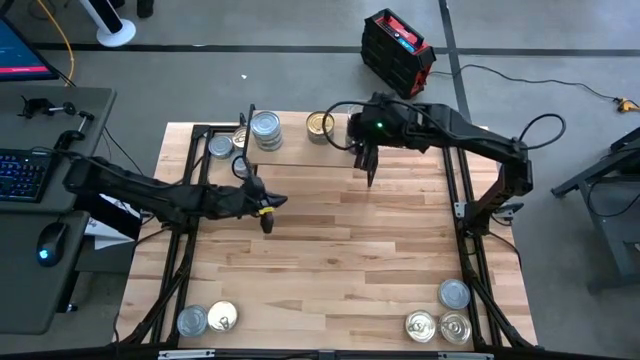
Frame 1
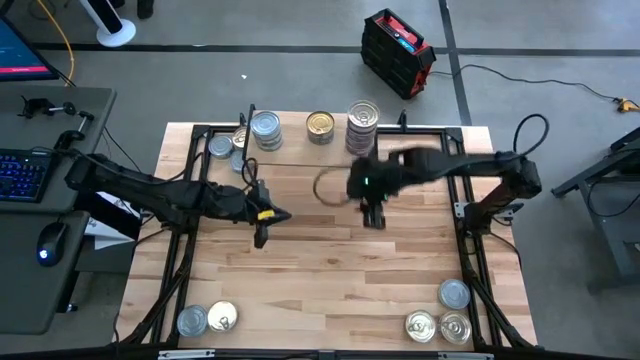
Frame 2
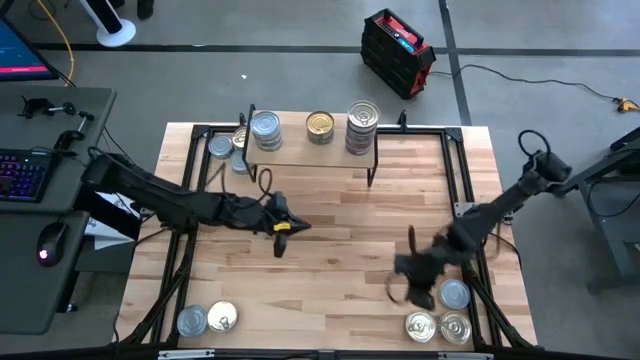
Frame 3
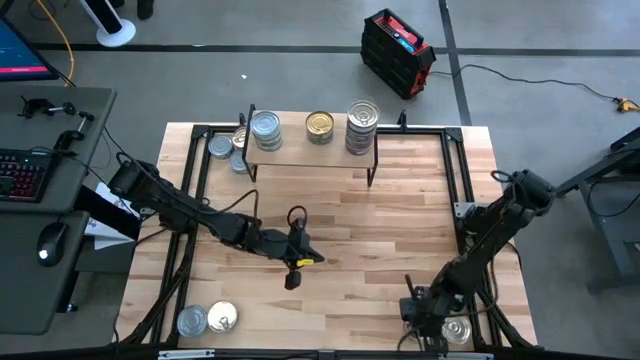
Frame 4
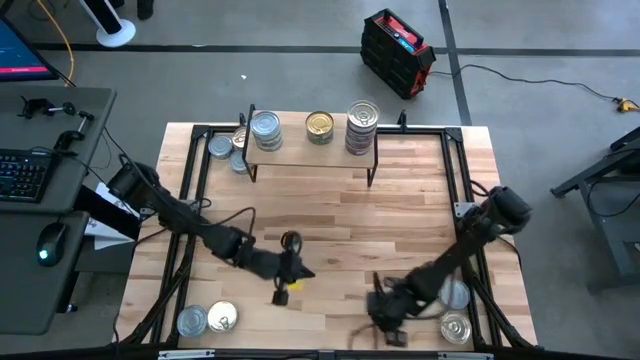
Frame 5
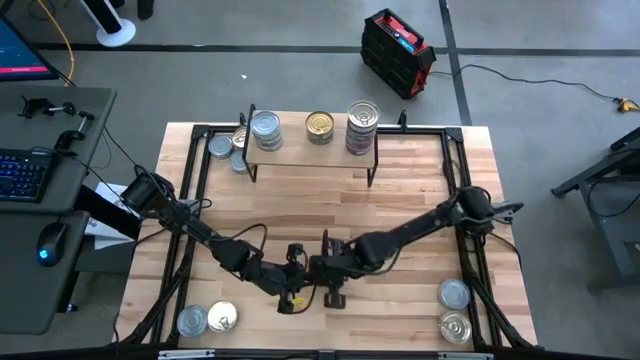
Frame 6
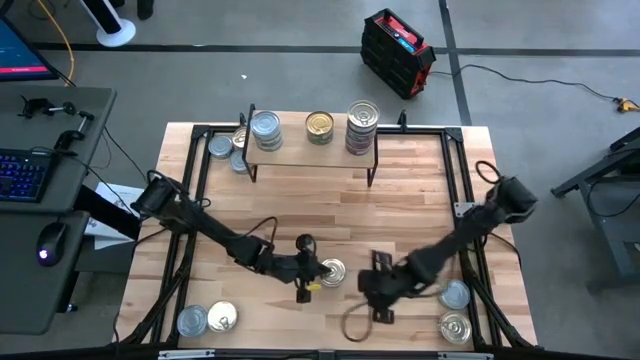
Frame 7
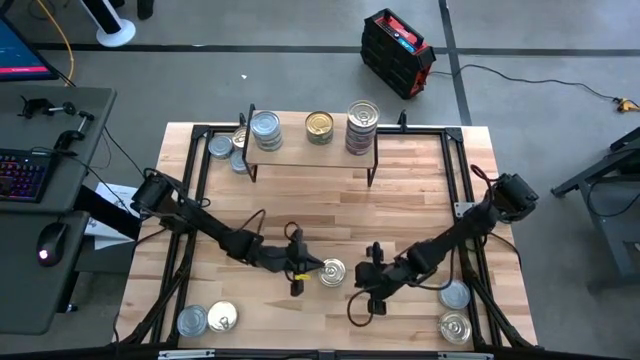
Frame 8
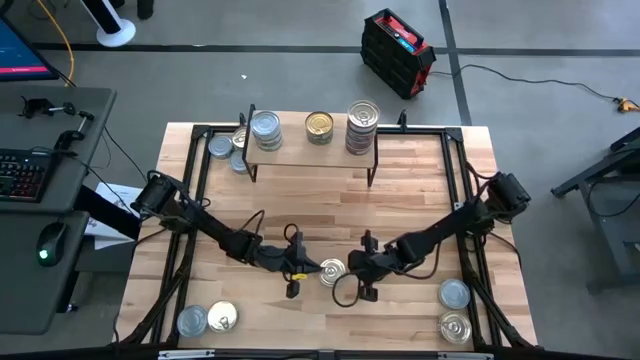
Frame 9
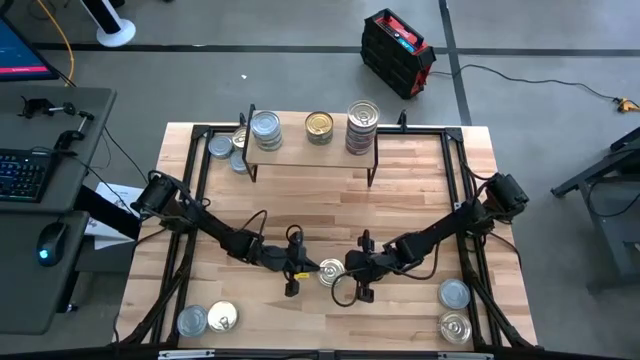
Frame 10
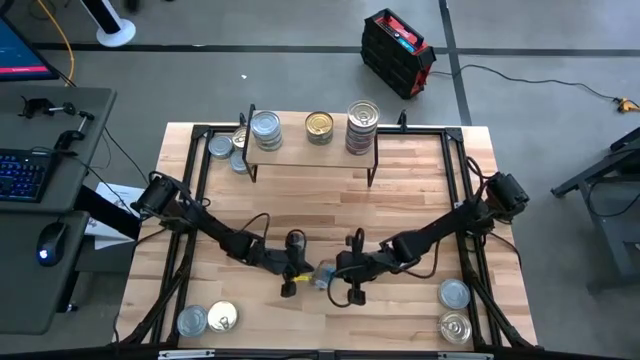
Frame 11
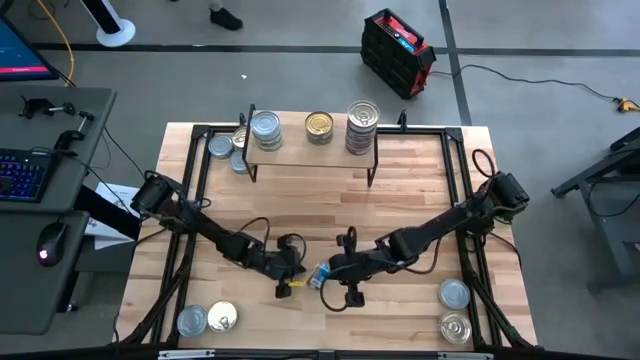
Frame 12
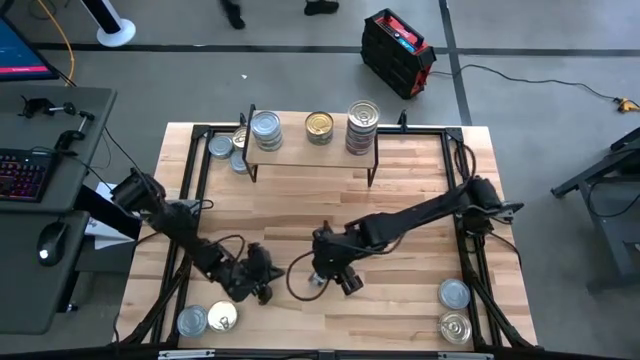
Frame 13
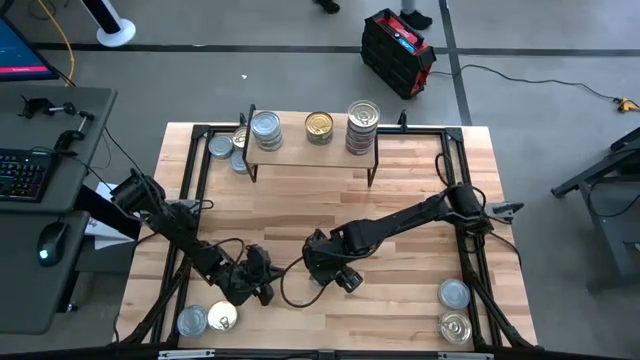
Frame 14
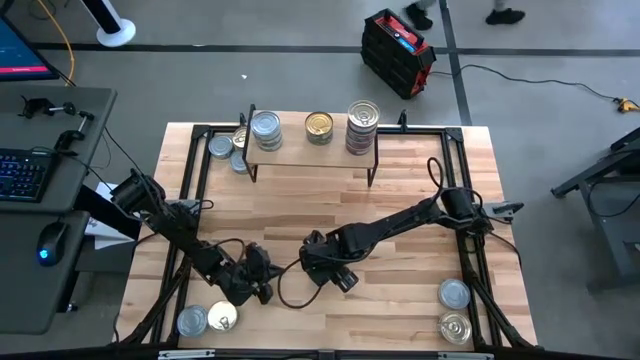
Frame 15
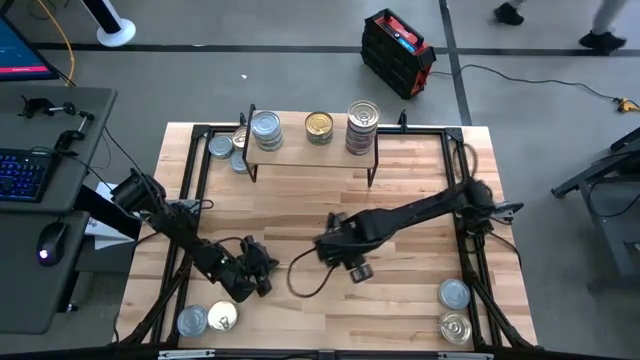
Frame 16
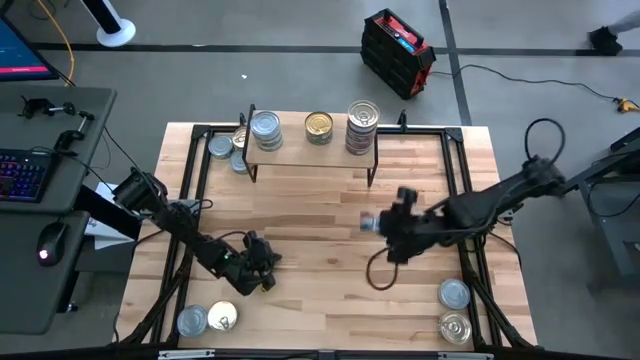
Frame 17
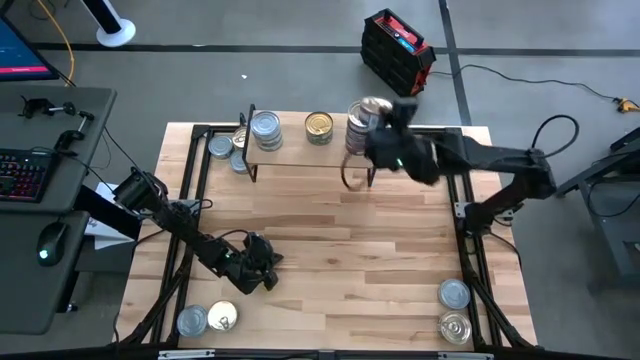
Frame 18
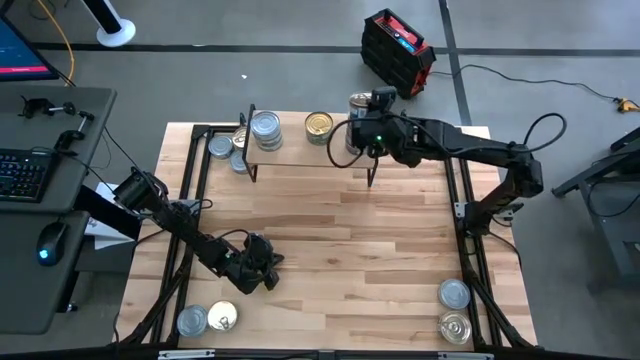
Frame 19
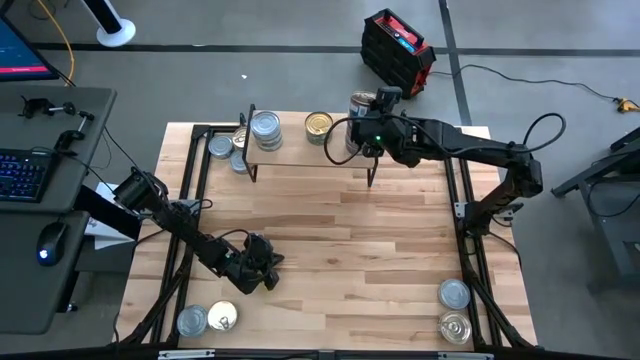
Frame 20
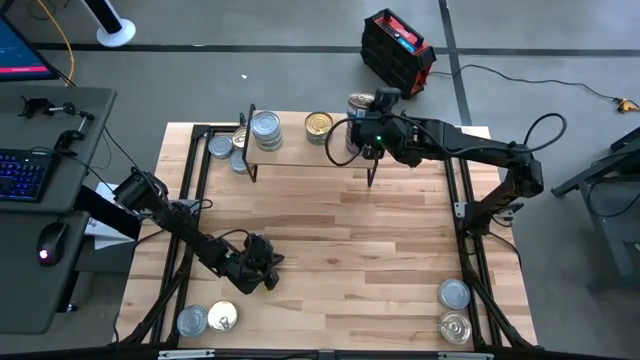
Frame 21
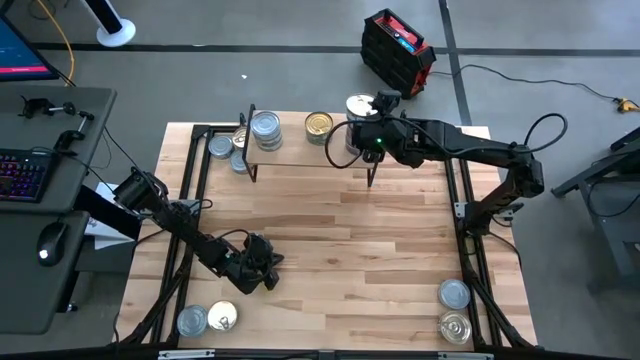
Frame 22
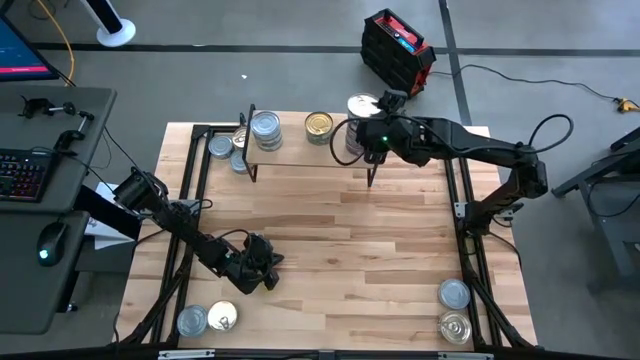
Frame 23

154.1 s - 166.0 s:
Task: Stack canned seafood by type on shelf
Stack the blue pink tuna can on top of the other blue pink tuna cans on the shelf

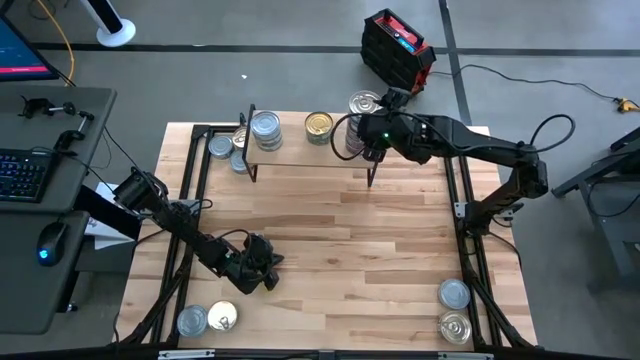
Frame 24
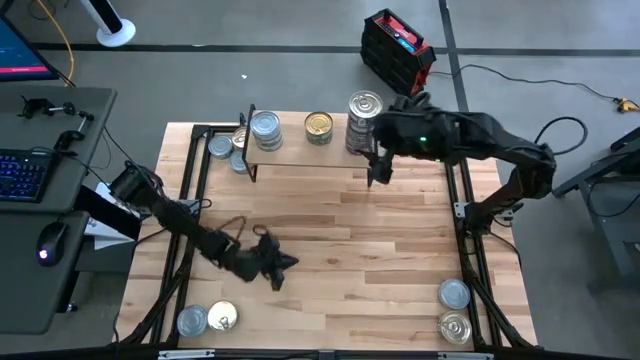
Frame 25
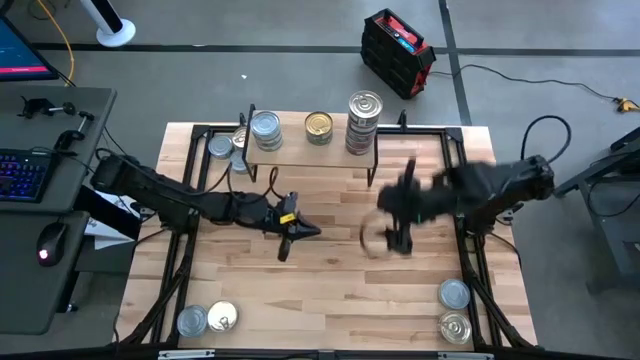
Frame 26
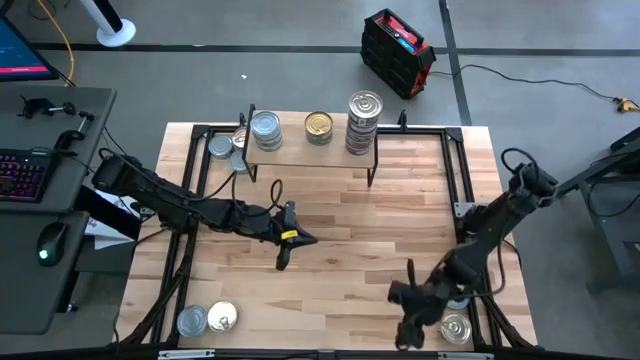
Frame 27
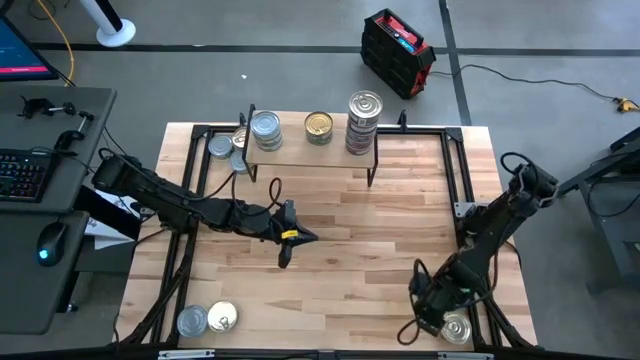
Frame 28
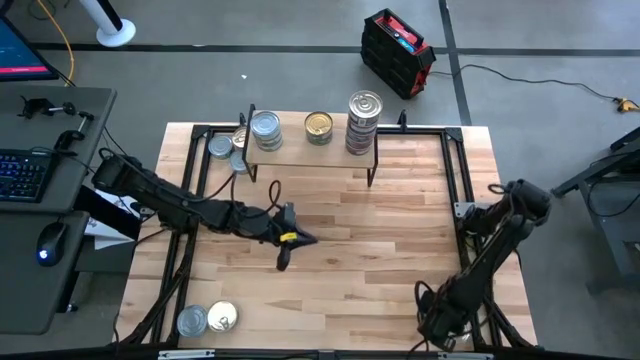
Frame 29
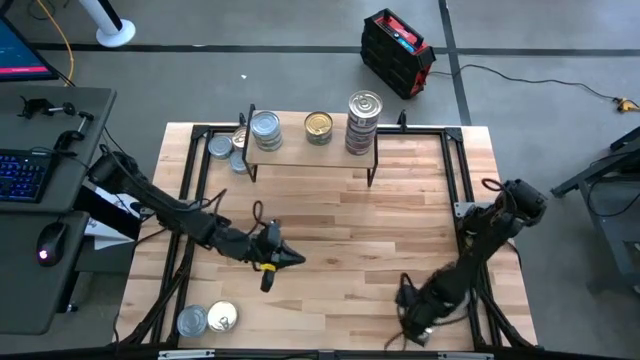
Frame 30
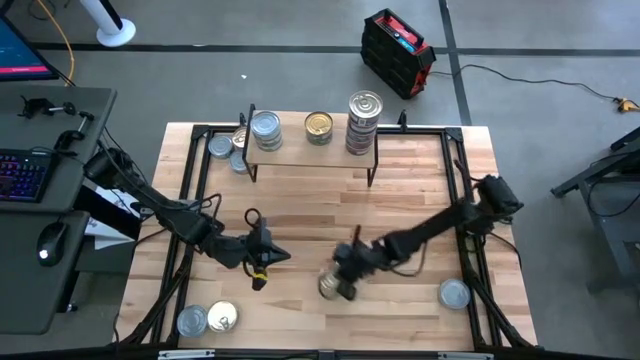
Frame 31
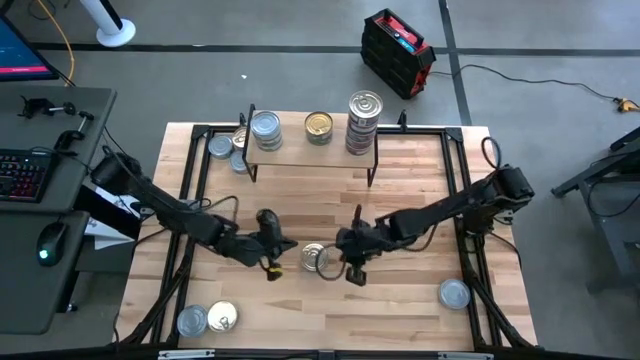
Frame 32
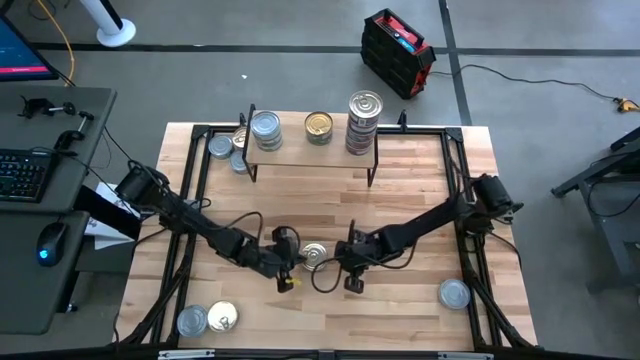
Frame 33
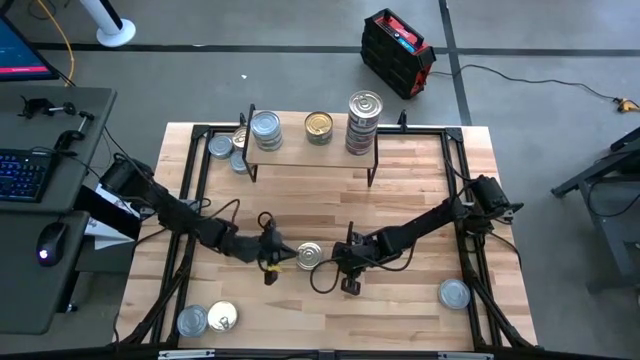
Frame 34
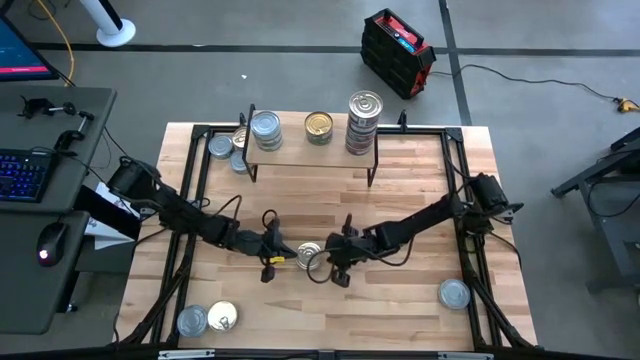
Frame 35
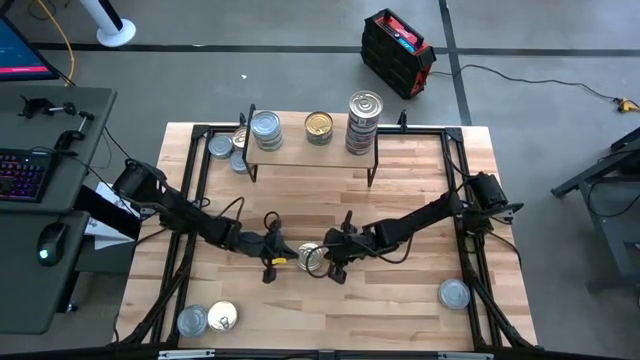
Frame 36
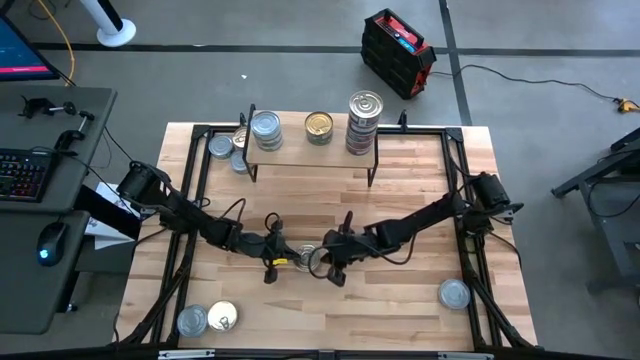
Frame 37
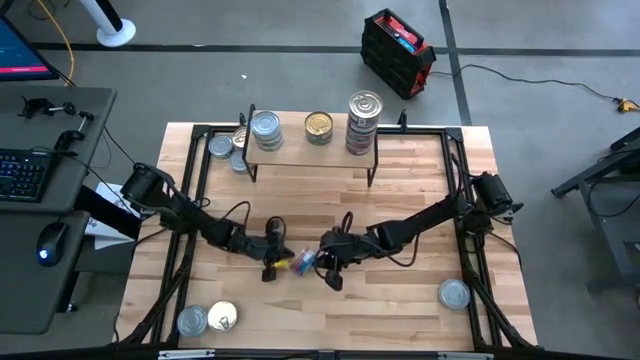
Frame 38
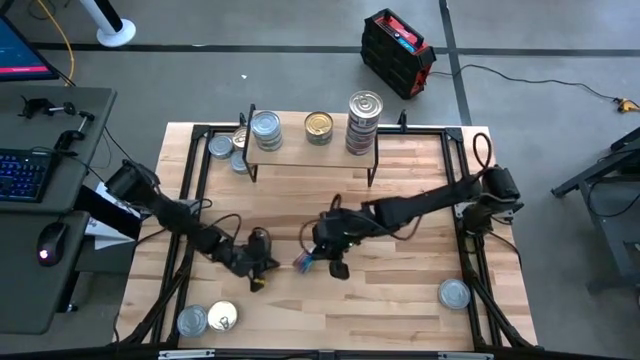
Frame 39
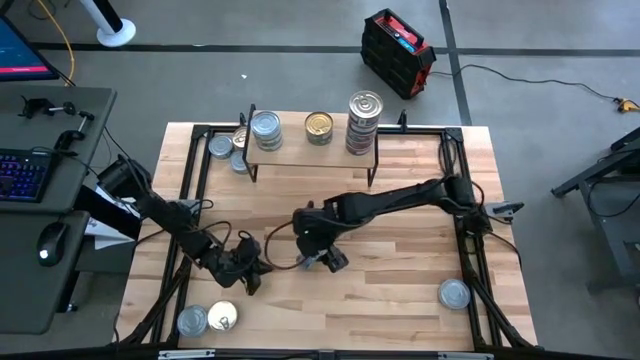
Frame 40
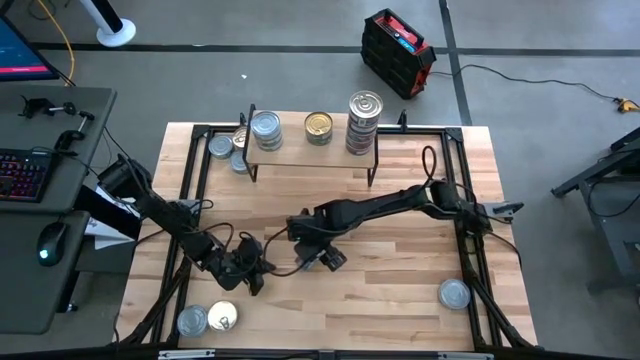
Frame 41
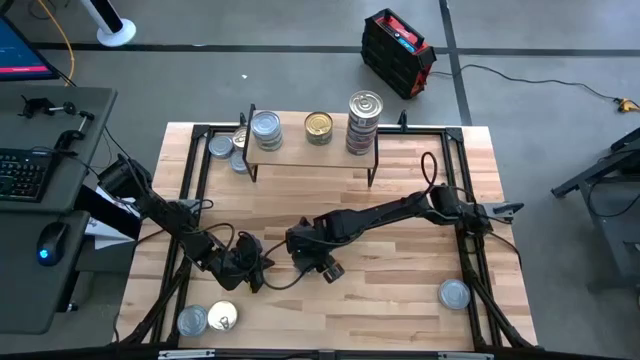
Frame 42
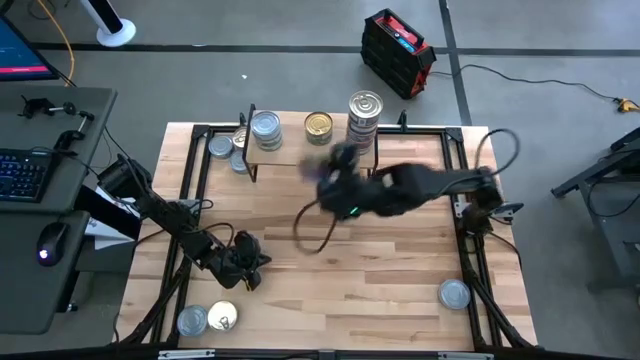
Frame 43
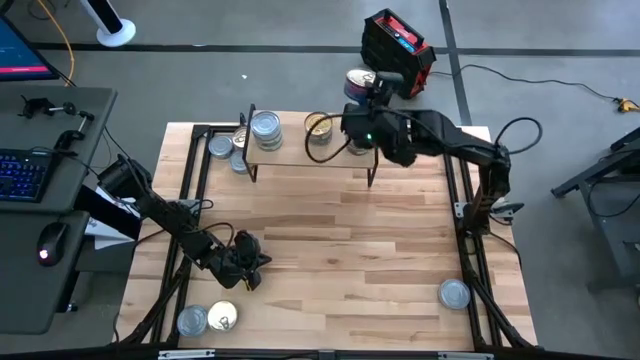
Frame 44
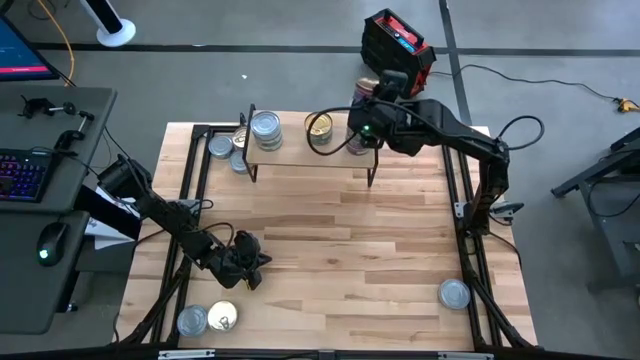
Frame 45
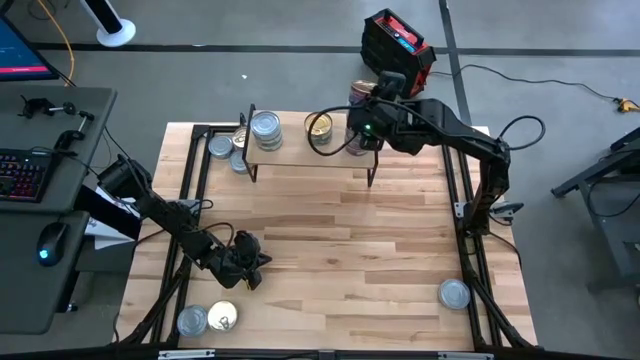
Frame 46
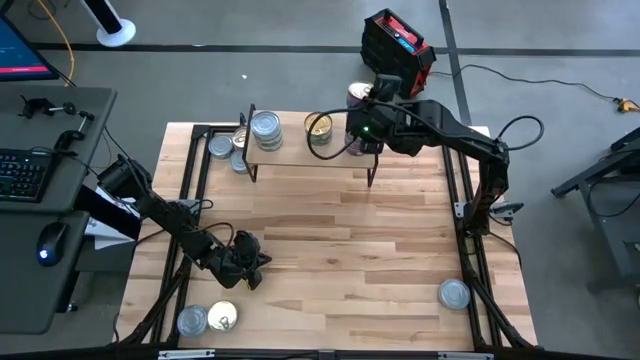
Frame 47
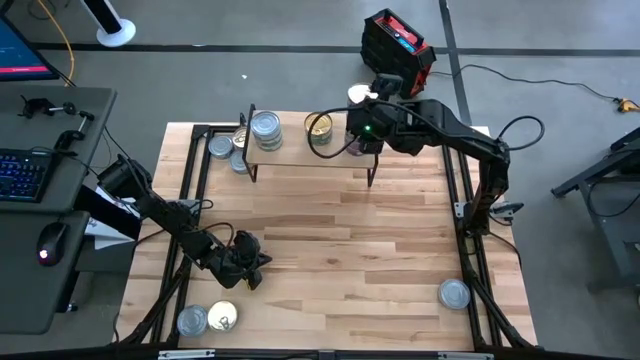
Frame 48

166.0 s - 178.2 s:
Stack the blue pink tuna can on top of the other blue pink tuna cans on the shelf
